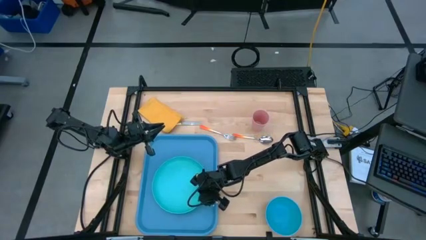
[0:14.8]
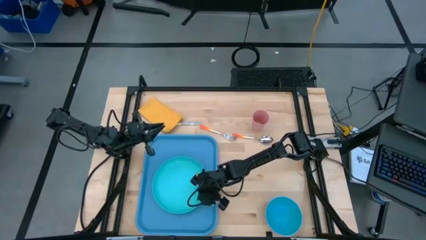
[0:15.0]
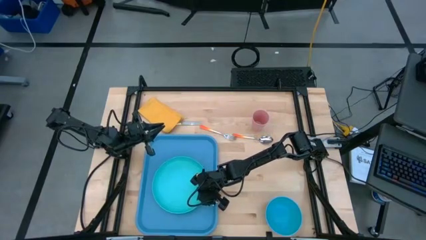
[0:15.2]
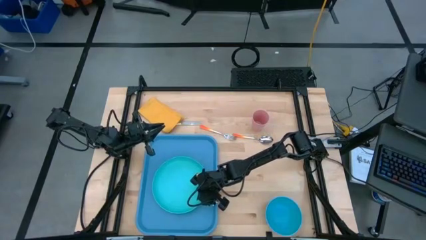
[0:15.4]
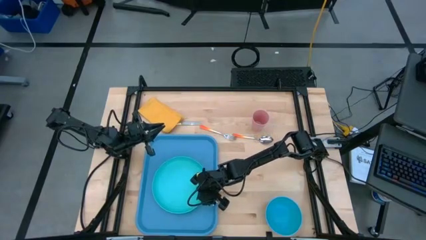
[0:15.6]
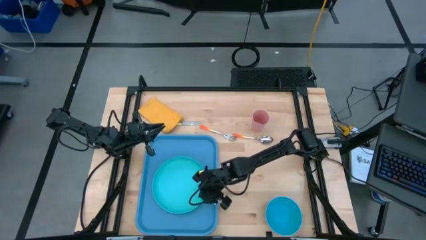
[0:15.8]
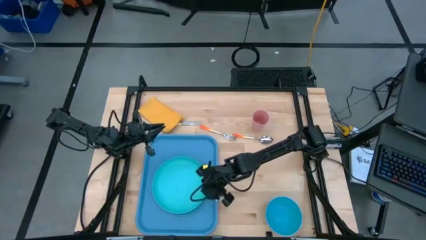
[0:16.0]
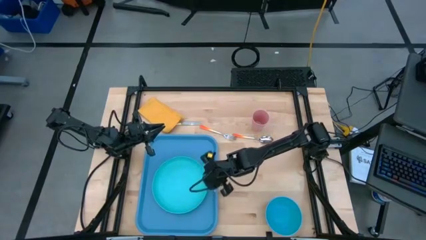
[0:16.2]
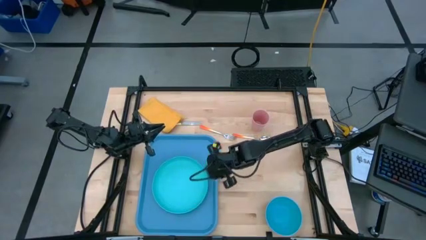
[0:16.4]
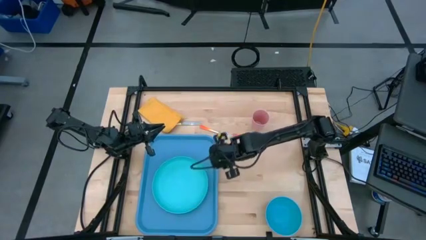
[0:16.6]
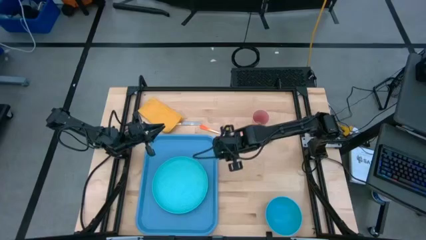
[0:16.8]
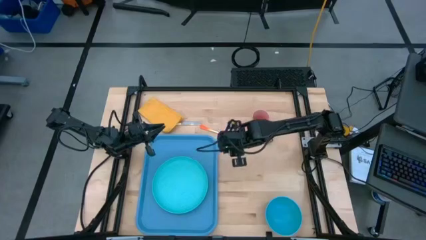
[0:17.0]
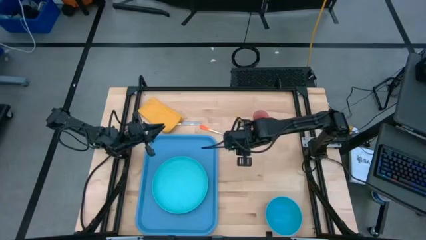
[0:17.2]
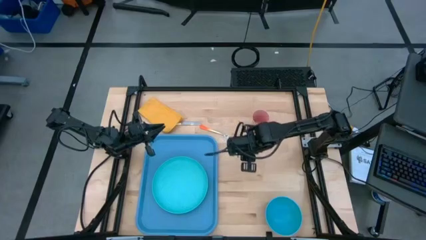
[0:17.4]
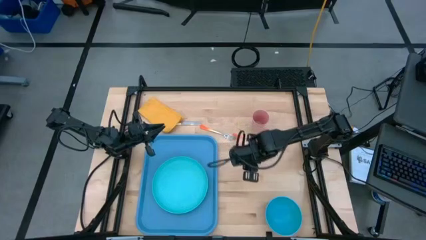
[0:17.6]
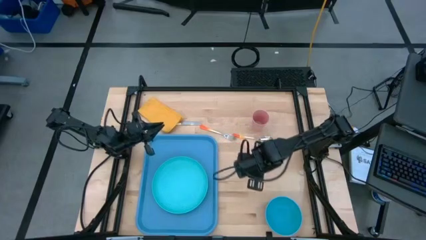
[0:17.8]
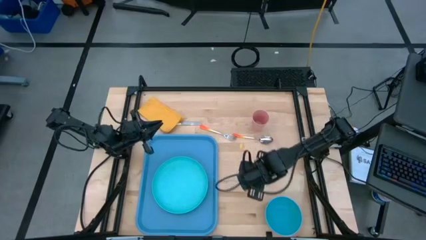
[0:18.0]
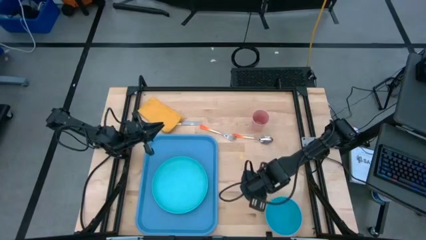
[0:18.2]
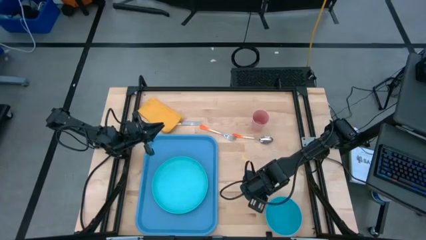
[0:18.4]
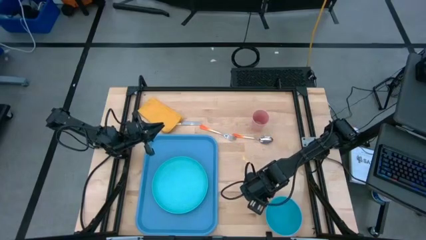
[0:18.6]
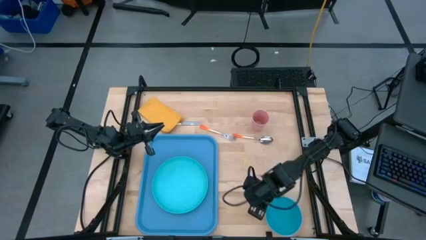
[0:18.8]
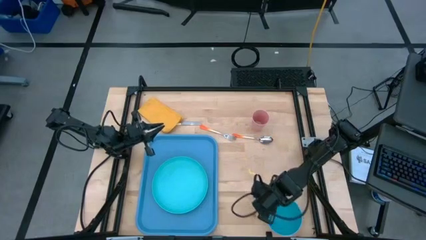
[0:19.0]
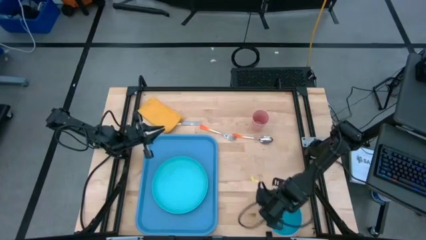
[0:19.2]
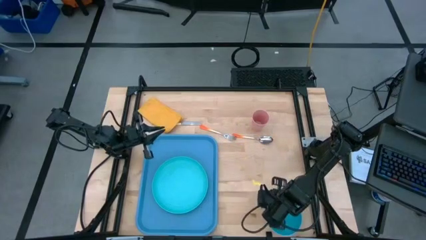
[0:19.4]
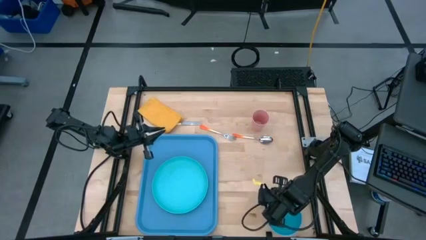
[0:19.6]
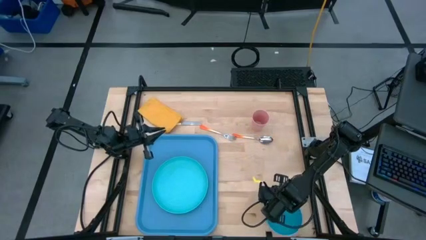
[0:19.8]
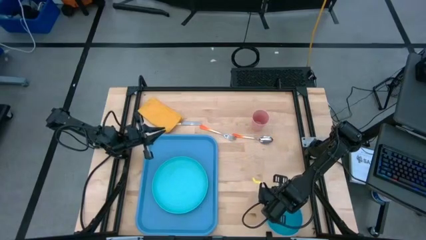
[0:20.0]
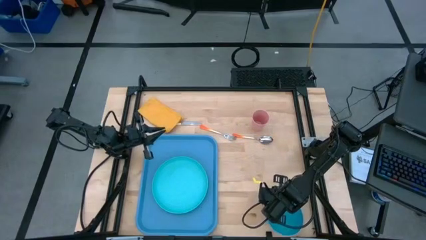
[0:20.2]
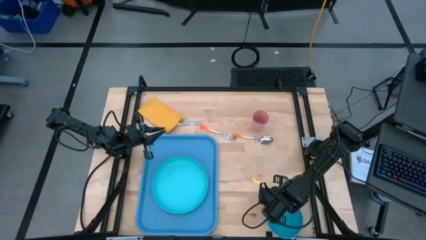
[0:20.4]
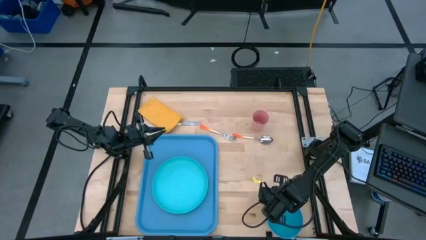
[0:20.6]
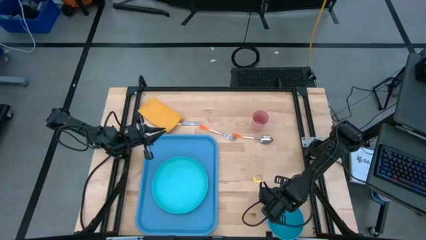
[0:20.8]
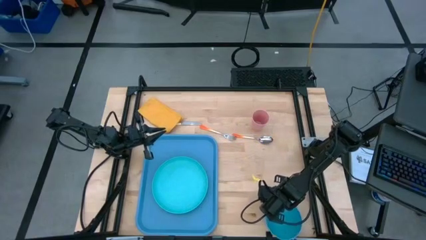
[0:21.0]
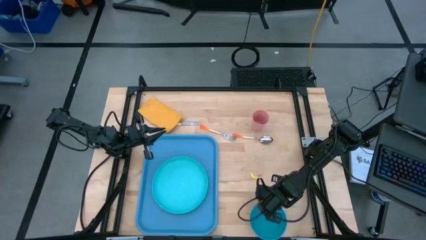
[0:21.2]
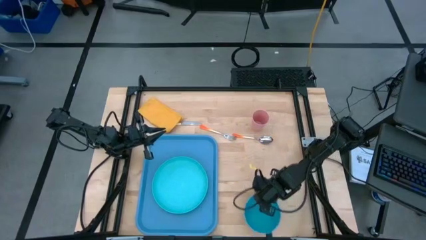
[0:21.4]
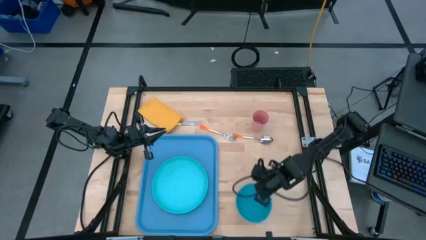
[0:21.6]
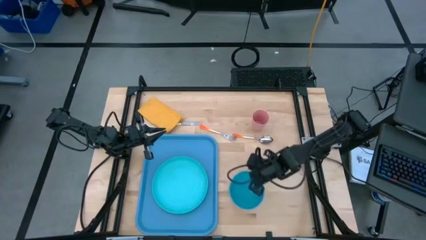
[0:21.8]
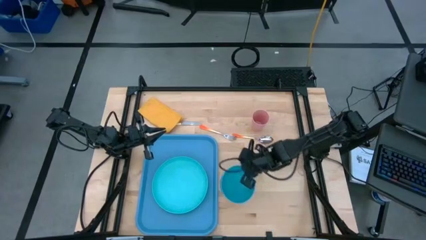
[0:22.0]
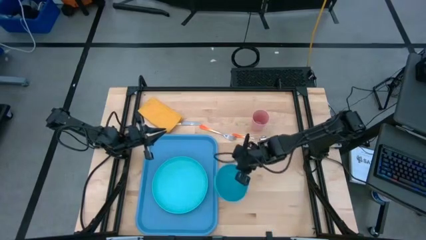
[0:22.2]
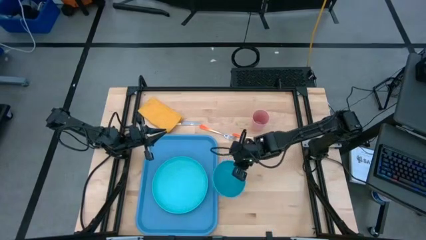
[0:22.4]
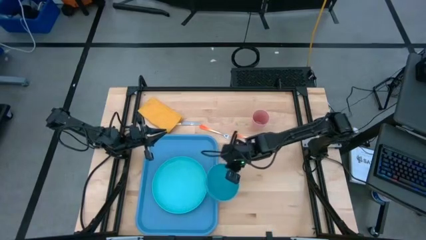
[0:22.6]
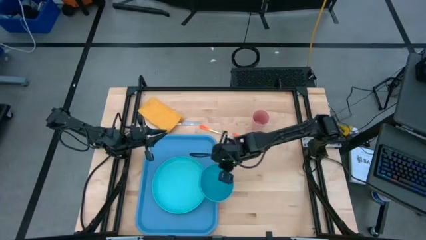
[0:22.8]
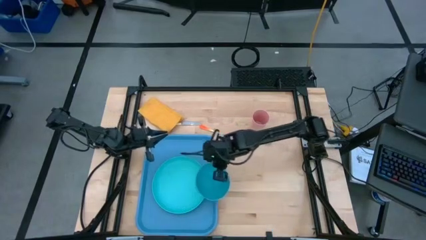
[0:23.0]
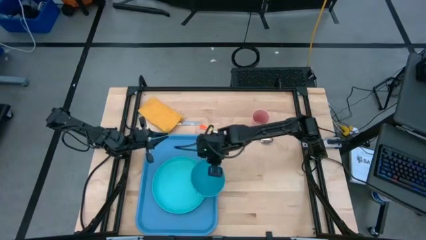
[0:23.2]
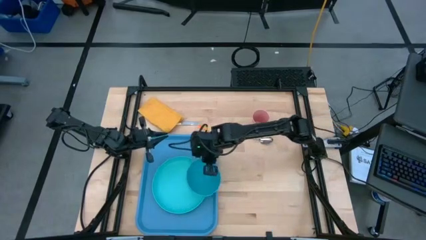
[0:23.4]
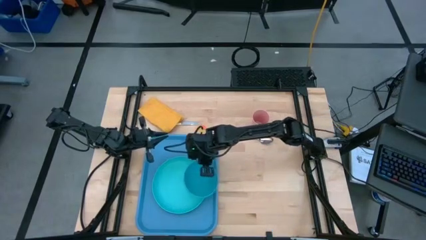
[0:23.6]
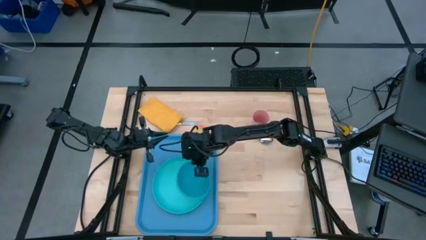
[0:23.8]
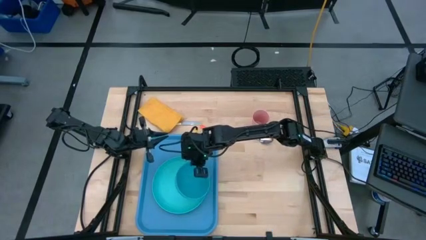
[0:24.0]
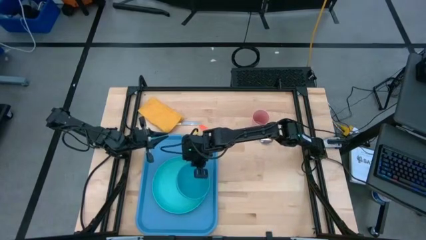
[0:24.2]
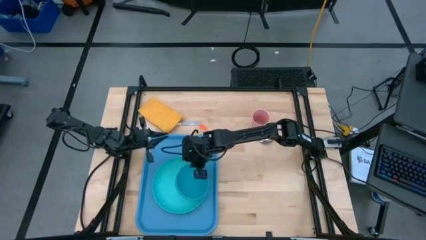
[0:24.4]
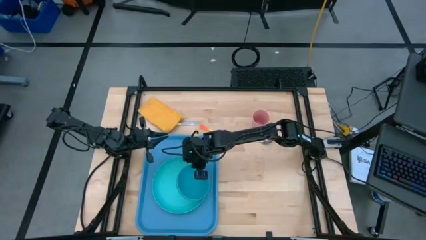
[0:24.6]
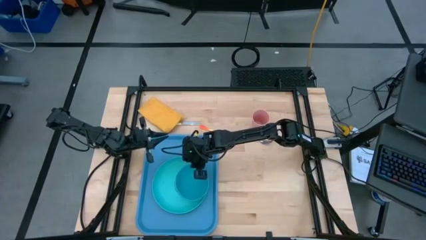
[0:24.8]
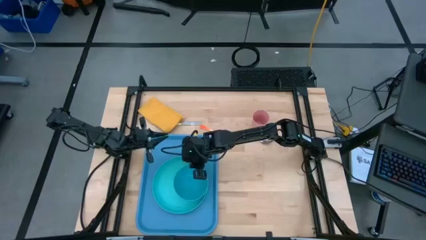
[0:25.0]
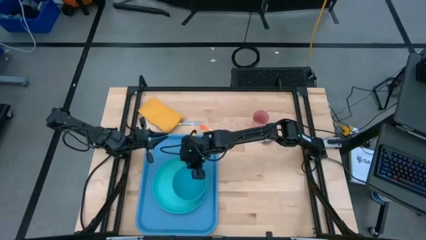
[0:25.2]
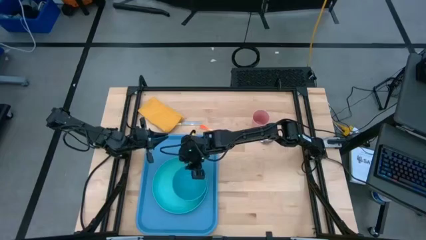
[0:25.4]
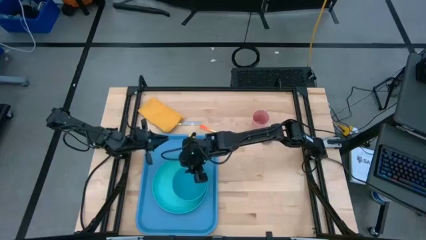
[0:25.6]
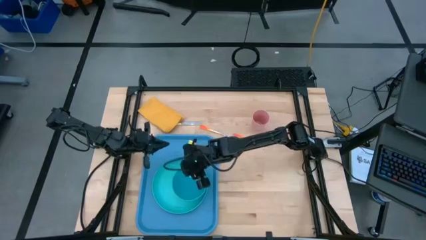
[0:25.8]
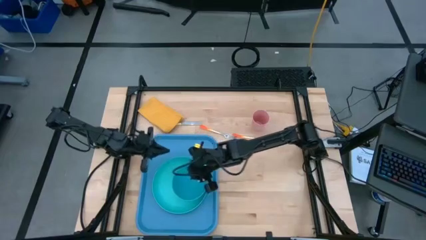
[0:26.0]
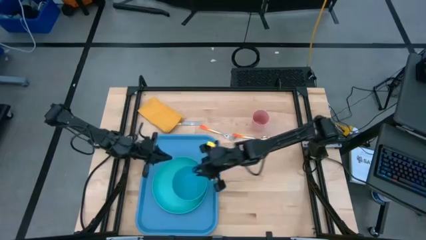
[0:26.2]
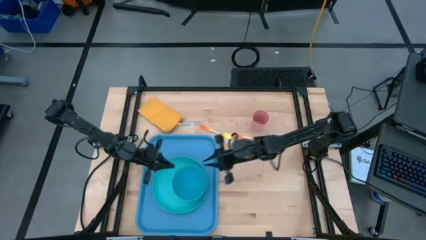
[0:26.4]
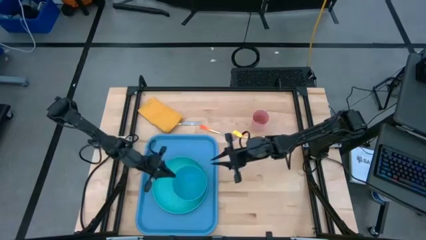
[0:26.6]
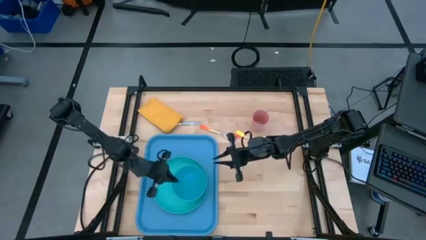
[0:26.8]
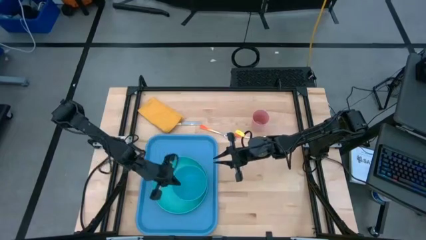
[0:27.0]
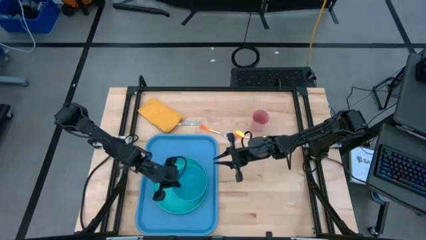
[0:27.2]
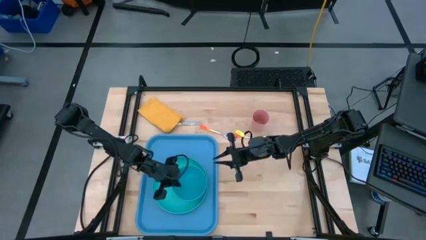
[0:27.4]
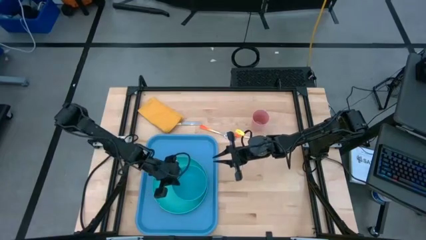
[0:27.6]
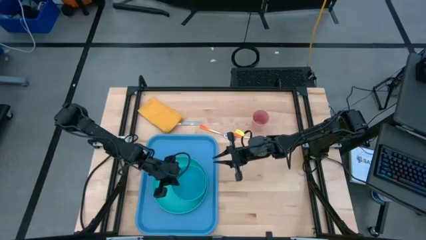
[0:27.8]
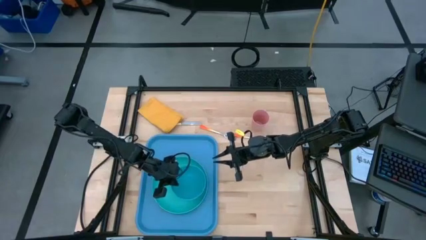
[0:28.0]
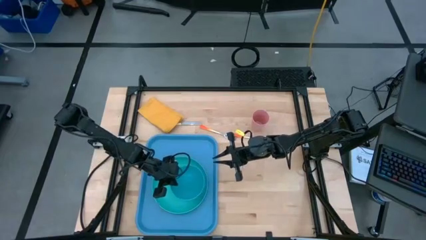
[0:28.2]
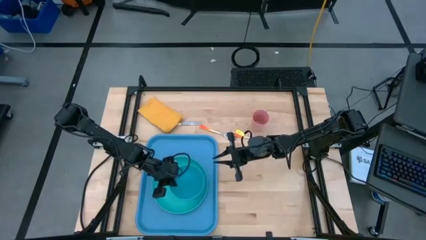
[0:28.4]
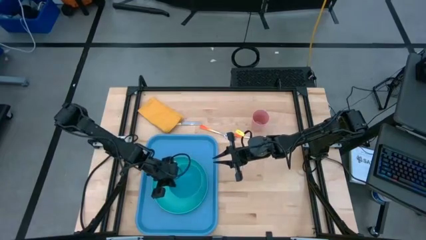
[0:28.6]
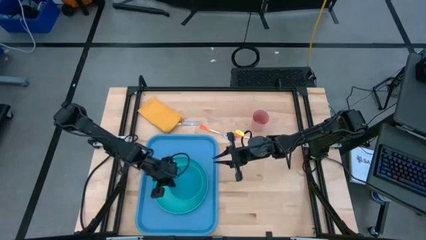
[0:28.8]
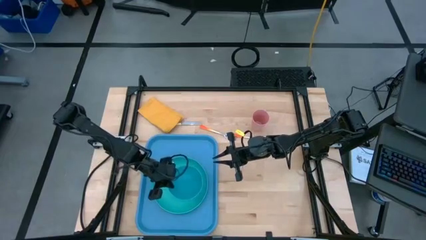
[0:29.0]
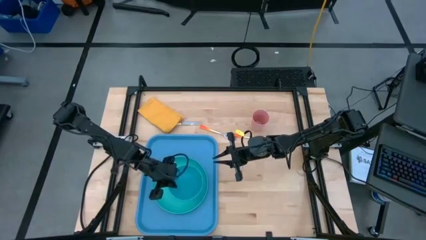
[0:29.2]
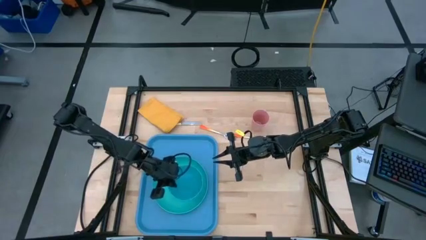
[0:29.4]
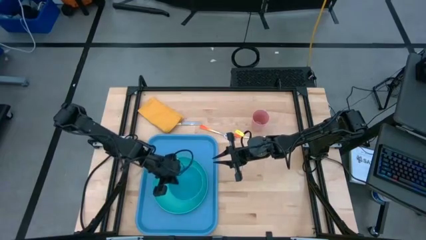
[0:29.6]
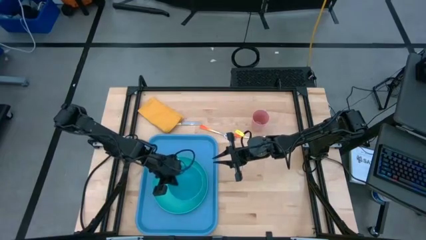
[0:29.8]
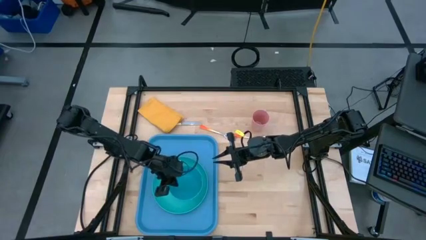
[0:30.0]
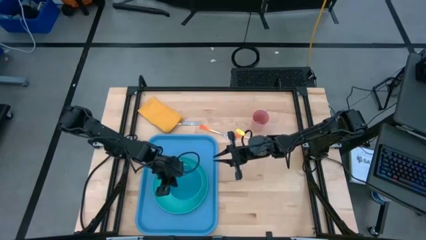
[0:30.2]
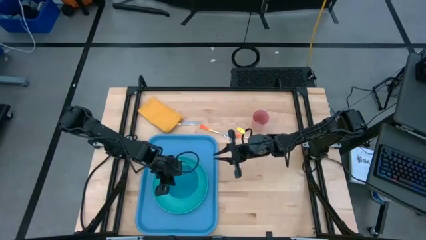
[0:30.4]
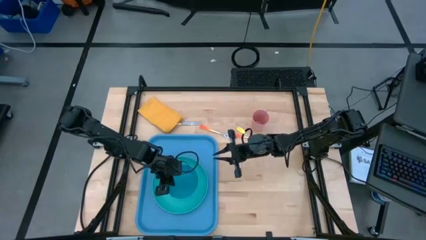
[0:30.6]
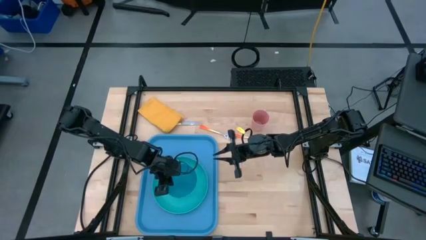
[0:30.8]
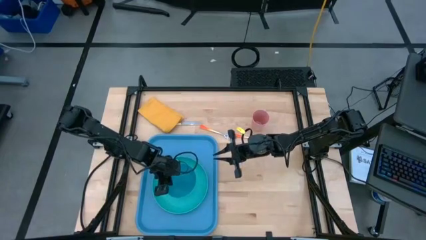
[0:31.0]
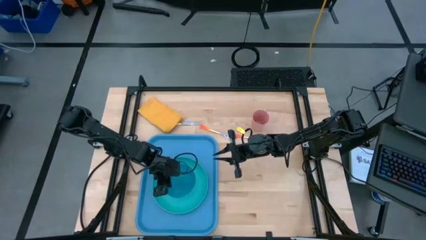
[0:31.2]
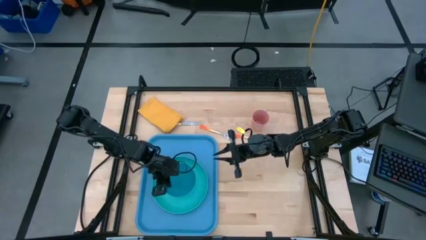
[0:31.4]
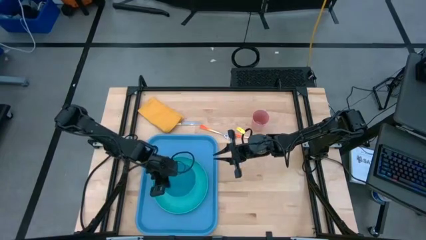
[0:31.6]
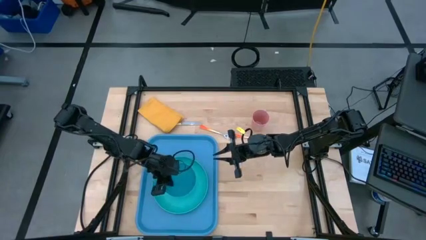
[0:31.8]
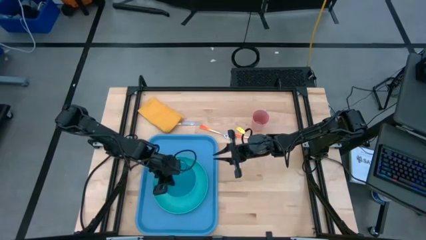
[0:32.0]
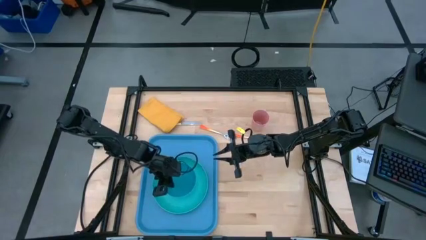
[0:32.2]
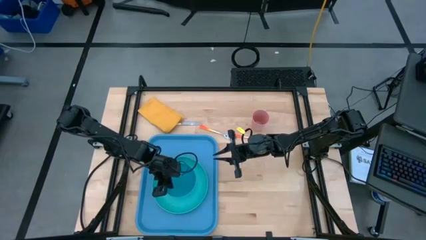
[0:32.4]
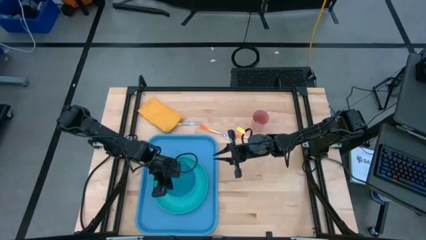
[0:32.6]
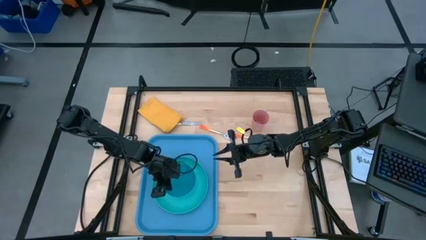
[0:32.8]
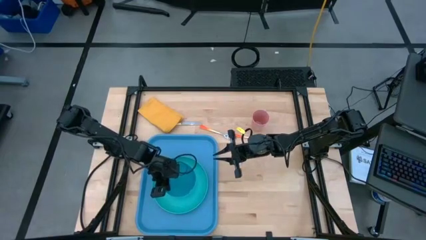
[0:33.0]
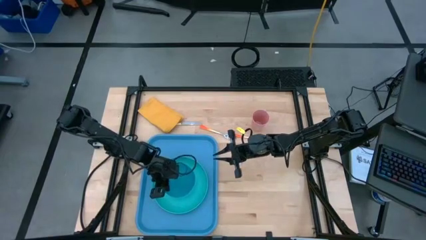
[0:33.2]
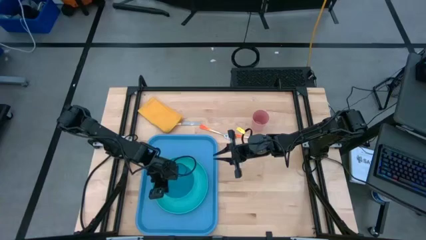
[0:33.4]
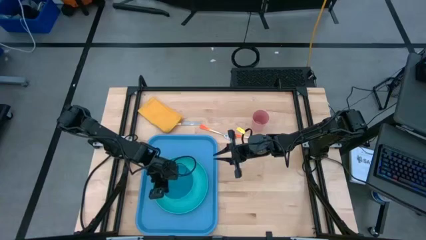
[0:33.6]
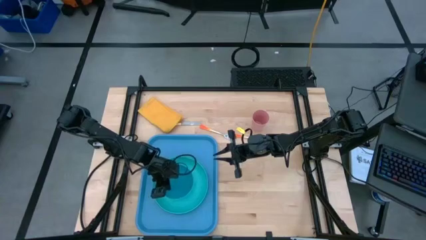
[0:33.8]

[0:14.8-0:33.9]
Task: Set up tray
Put the blue bowl on top of the green plate
